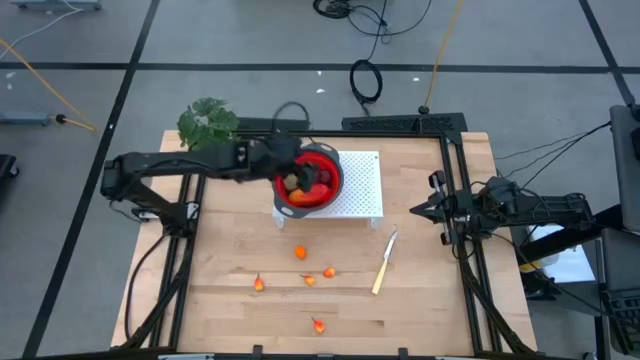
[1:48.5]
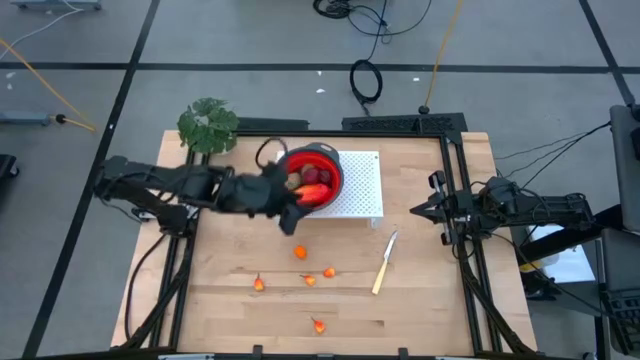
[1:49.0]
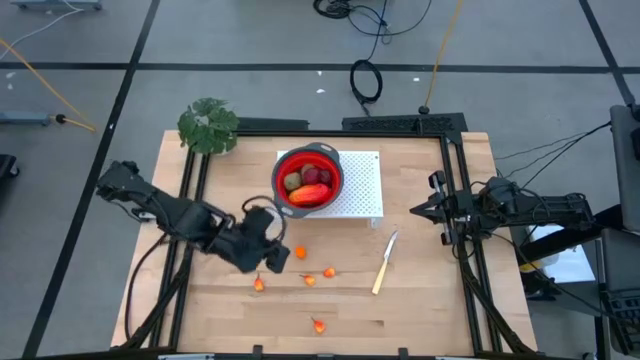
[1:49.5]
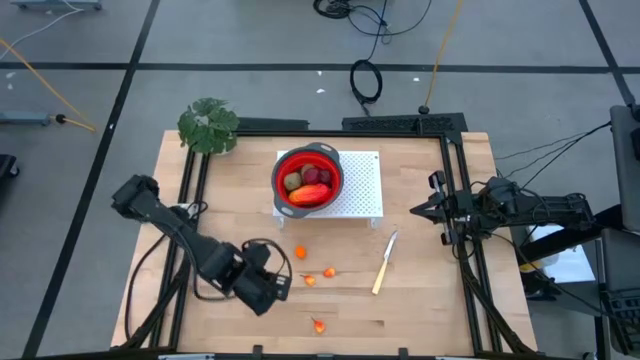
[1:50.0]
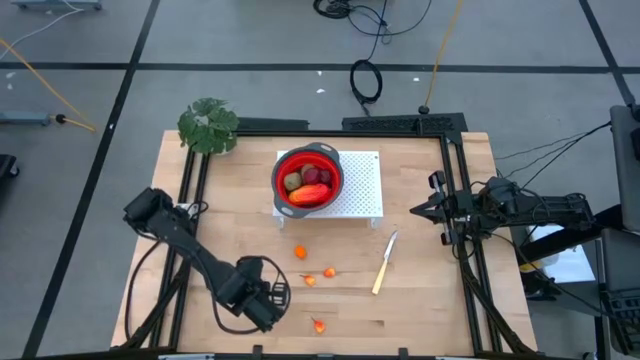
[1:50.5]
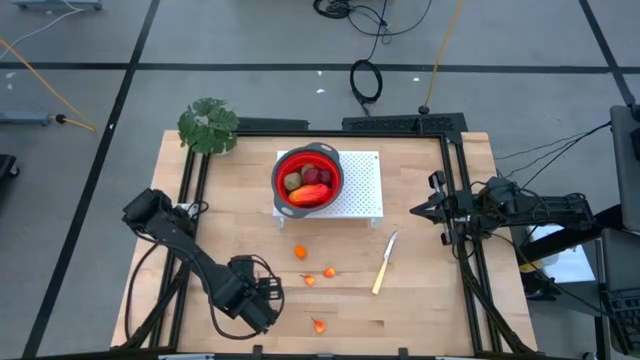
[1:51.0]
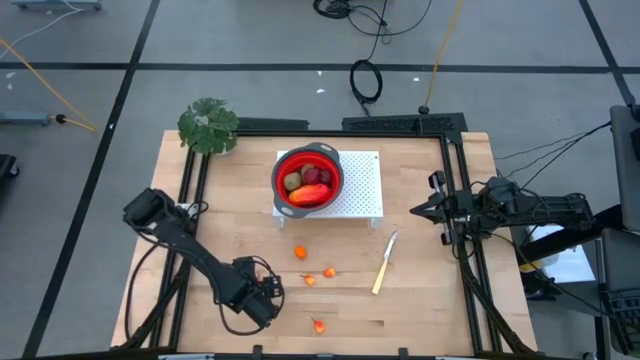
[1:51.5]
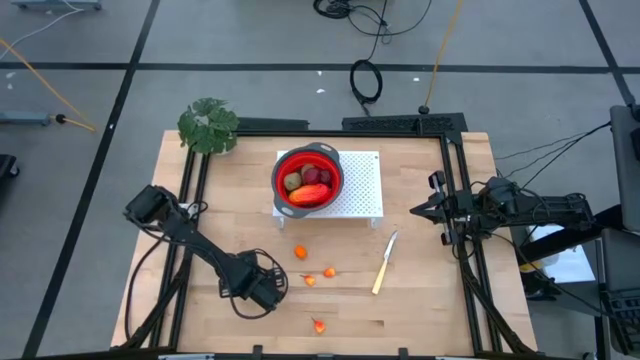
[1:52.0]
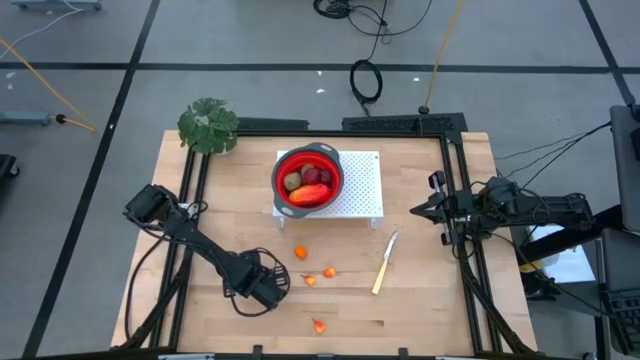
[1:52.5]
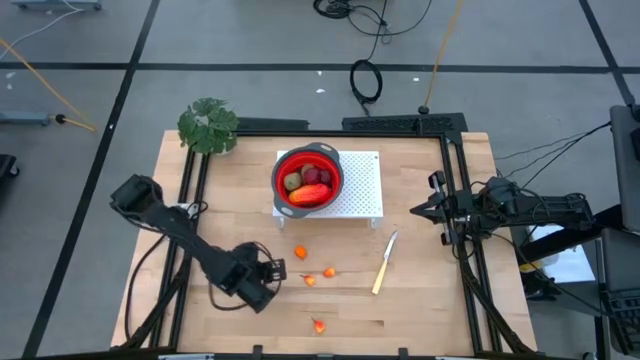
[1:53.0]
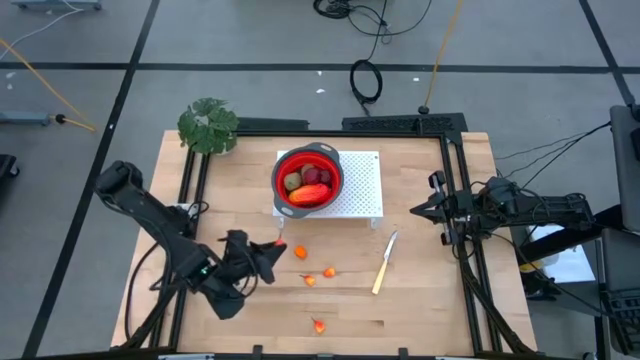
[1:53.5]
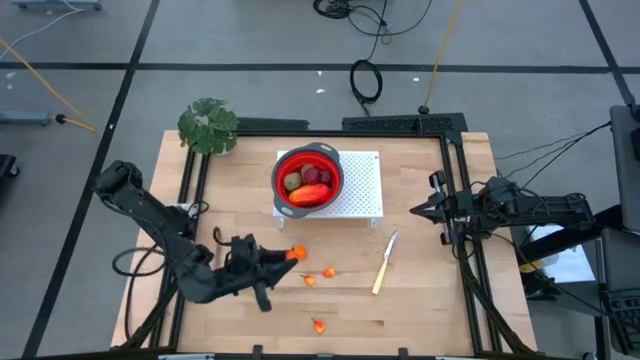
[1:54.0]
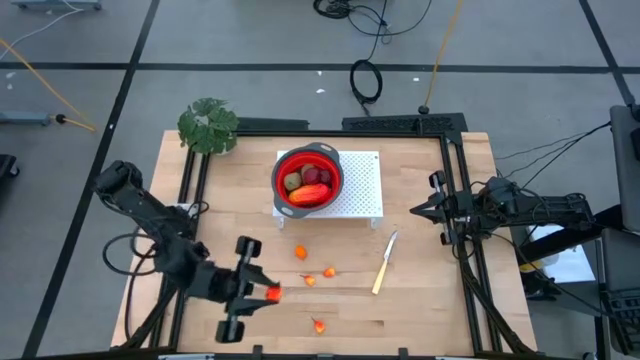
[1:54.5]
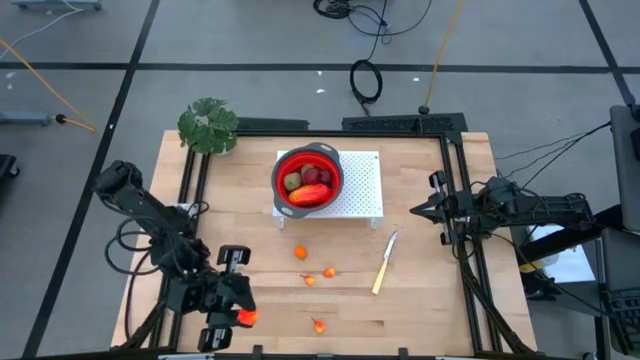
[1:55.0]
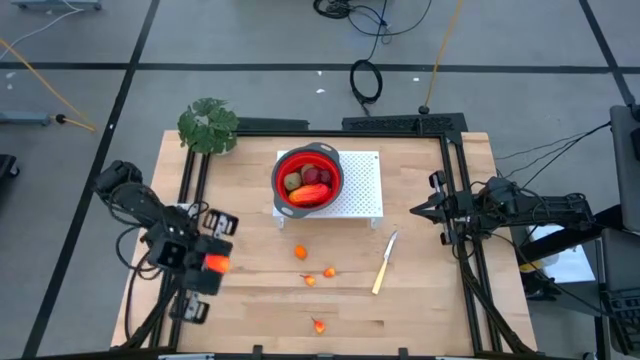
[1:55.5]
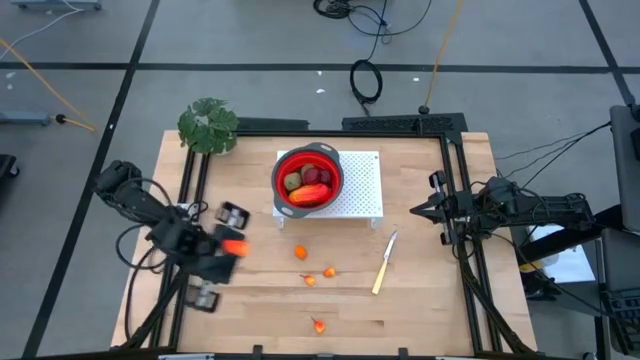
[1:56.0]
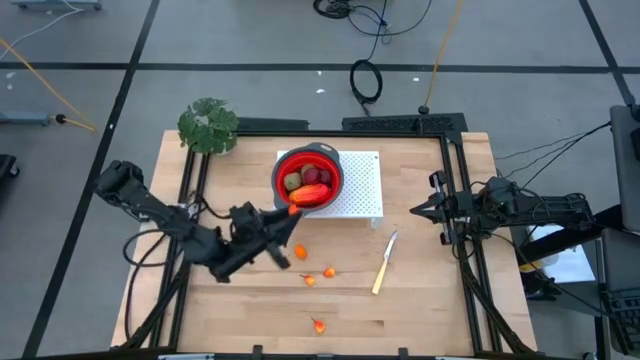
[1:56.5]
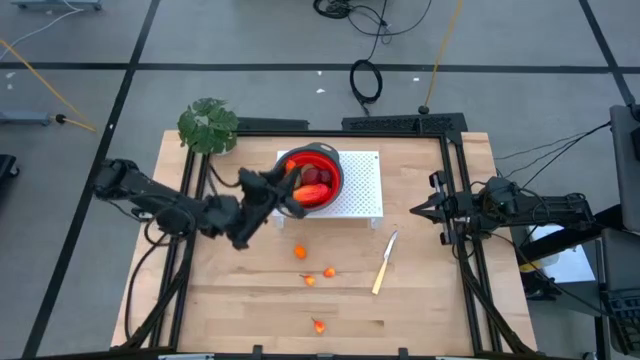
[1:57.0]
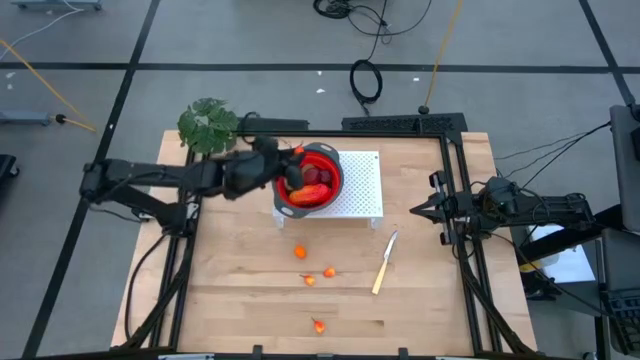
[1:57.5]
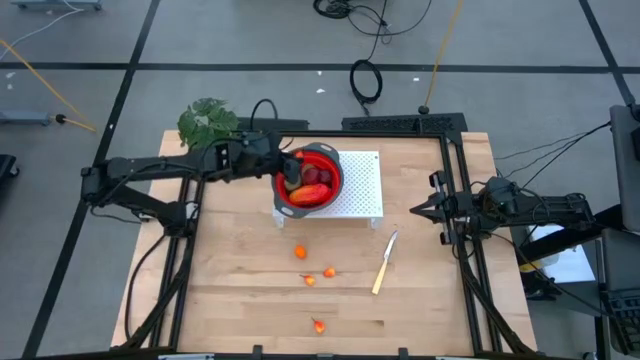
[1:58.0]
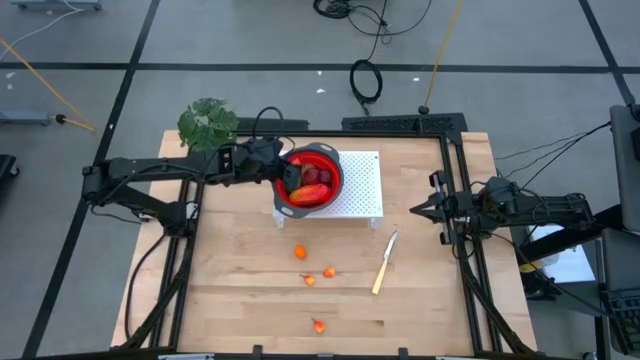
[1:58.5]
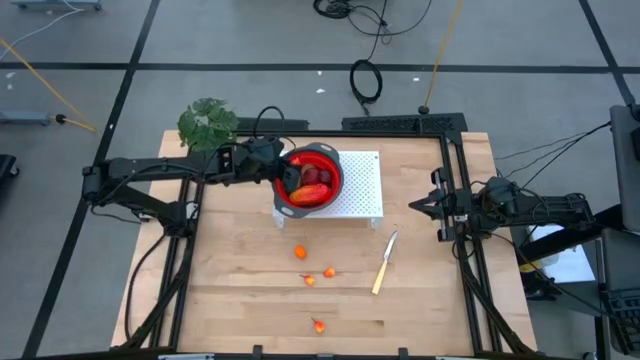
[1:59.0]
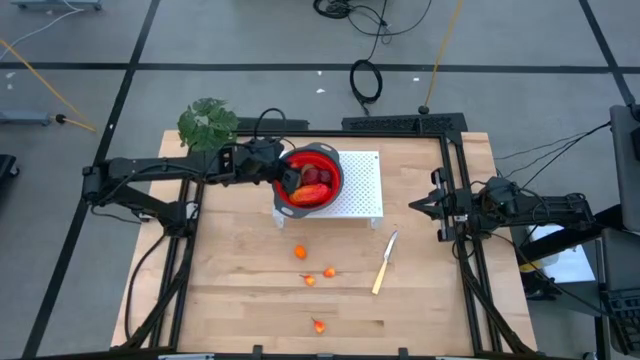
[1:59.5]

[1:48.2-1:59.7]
Task: Pick & Place Fruit
Put the orange peach into the orange strainer bowl on the shelf

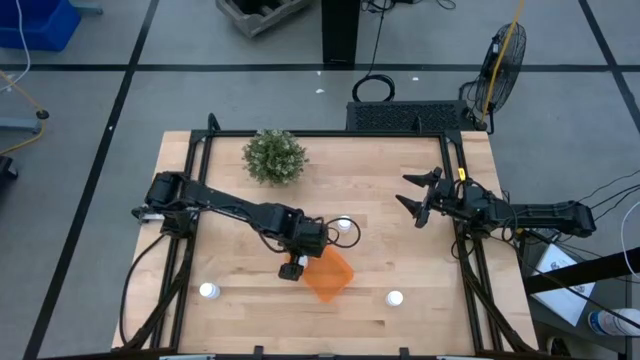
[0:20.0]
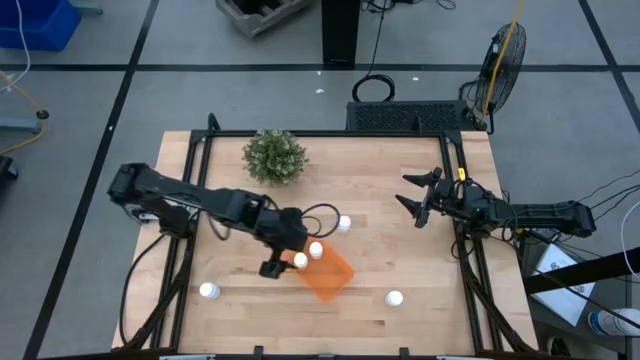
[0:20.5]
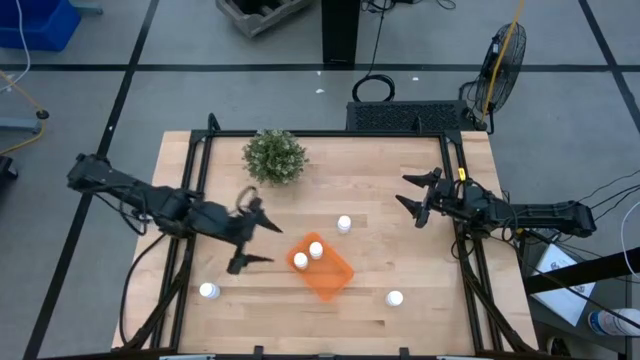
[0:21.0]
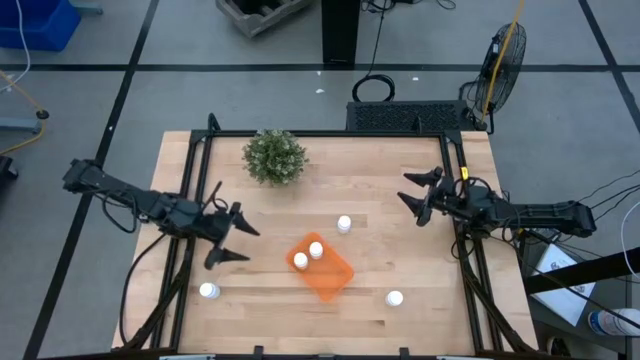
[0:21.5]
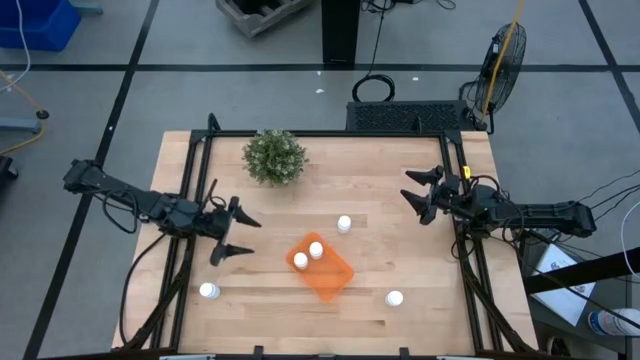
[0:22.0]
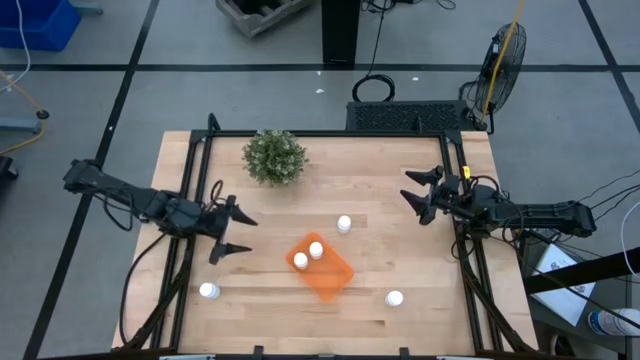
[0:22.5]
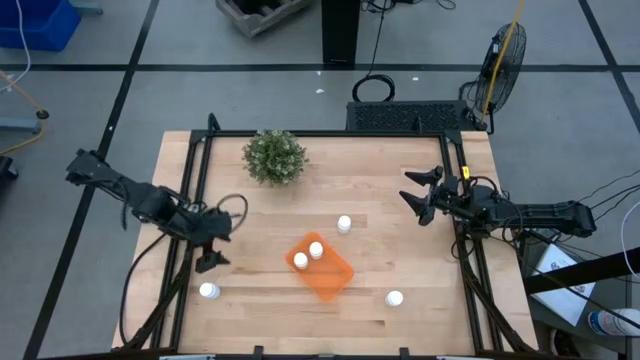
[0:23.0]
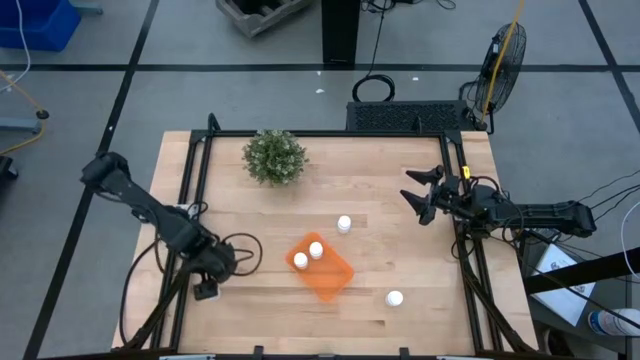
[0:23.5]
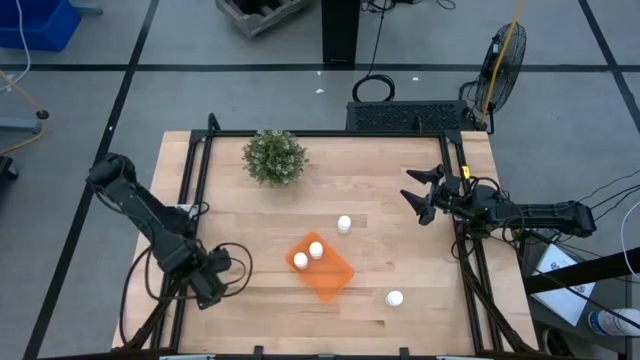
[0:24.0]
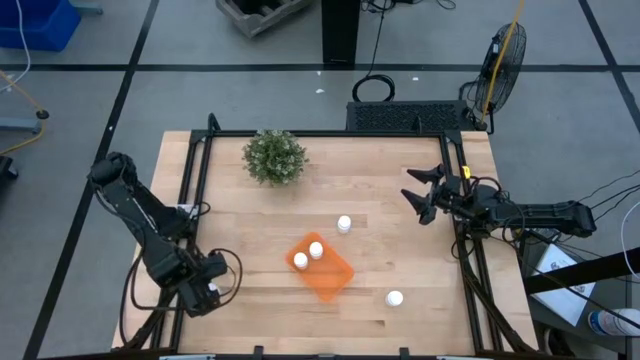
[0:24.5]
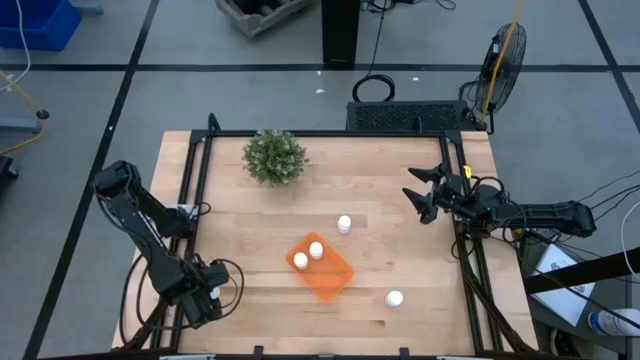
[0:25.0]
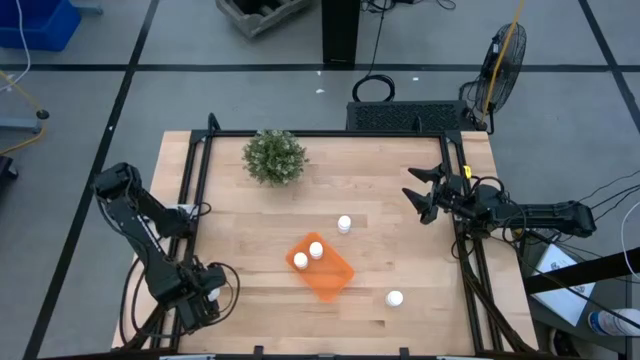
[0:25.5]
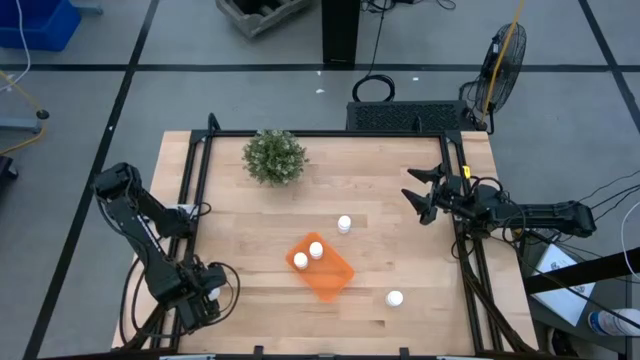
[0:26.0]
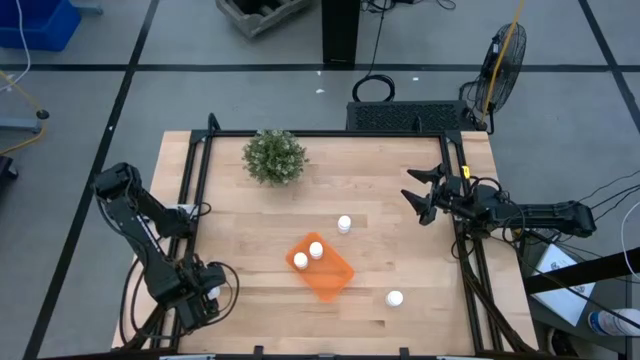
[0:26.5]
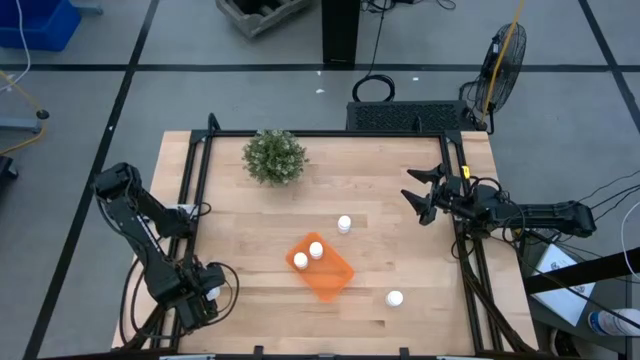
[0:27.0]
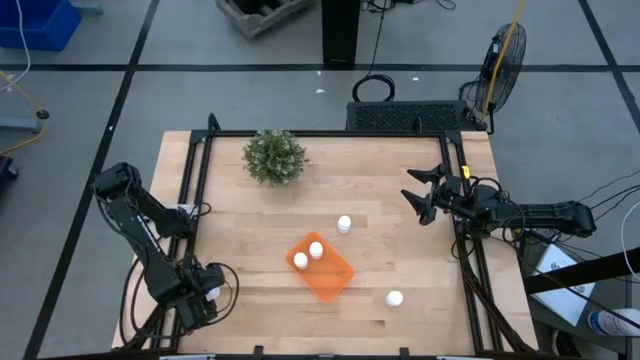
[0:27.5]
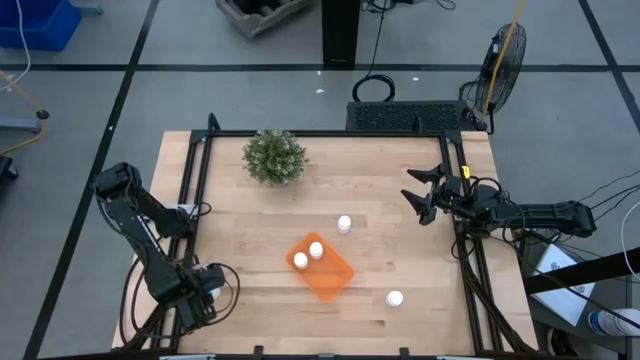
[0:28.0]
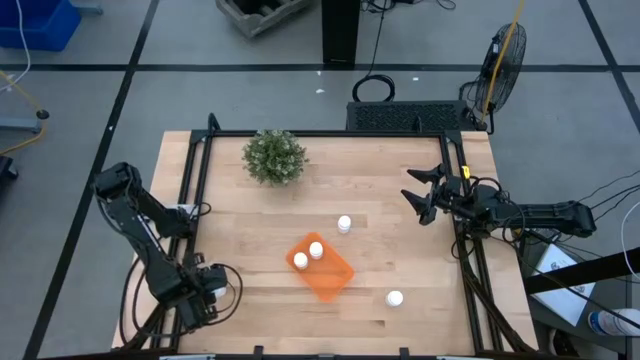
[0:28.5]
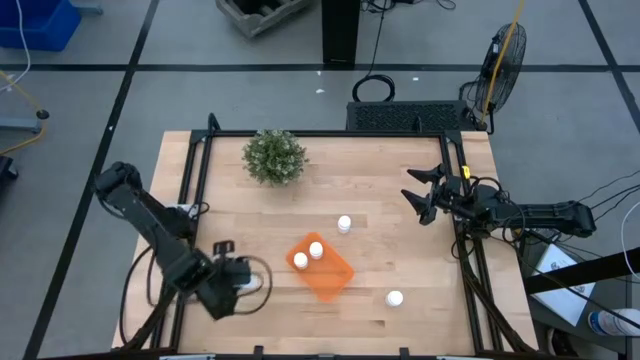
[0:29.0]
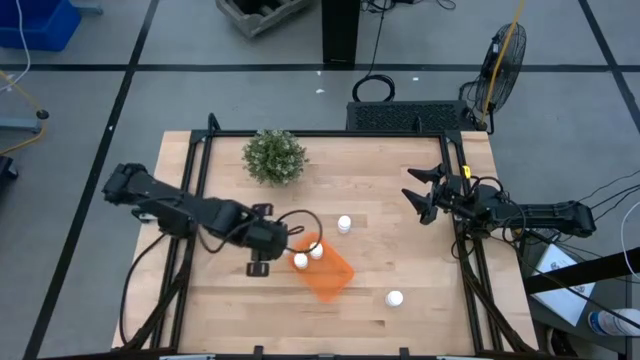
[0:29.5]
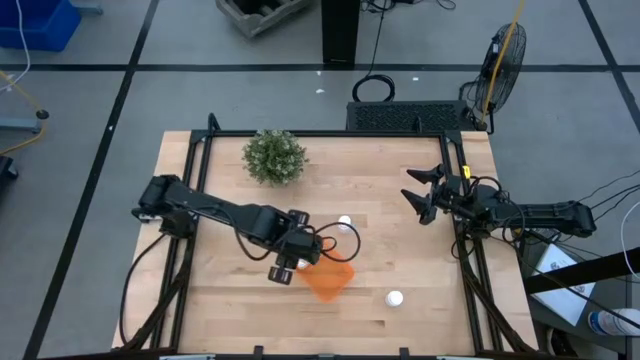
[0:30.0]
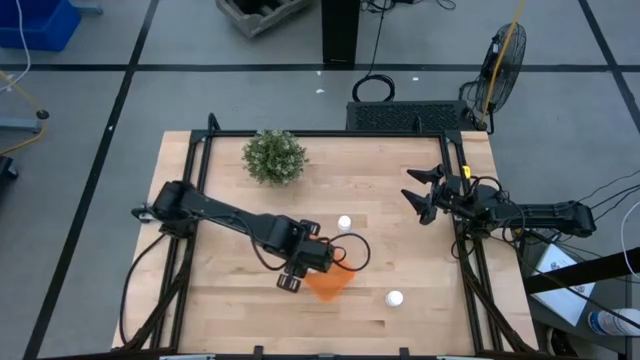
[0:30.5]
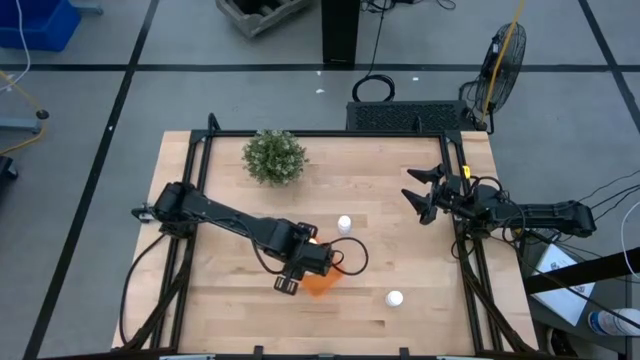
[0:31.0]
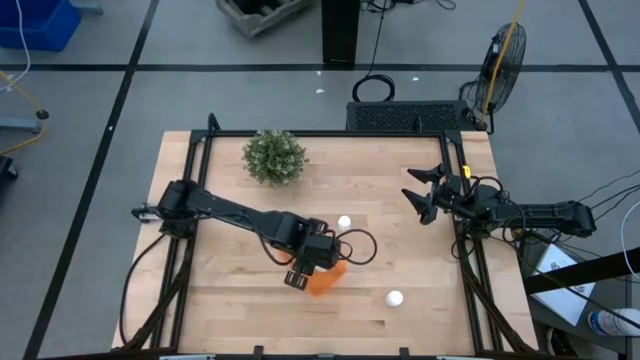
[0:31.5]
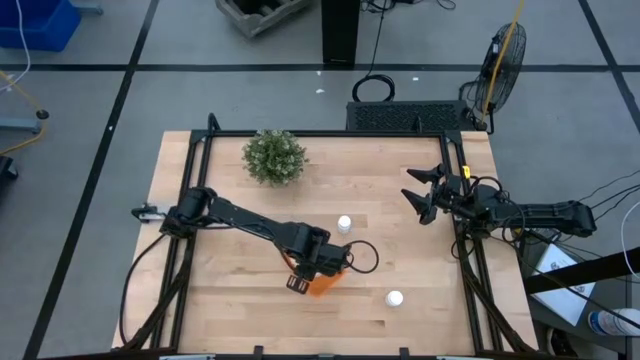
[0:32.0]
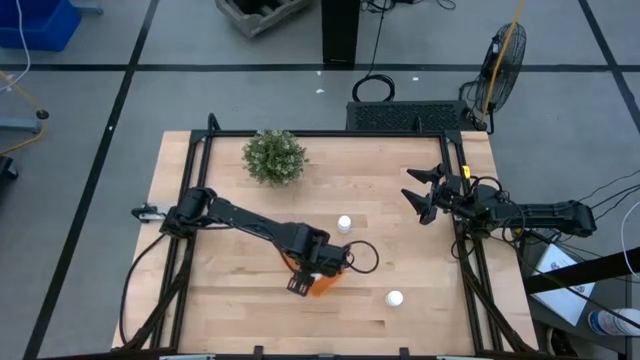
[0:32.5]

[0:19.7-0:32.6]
Task: Pick and place pill bottles into a basket
Put the white medicine bottle into the orange bin
